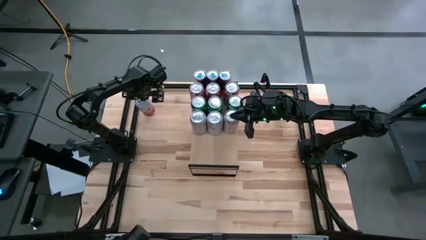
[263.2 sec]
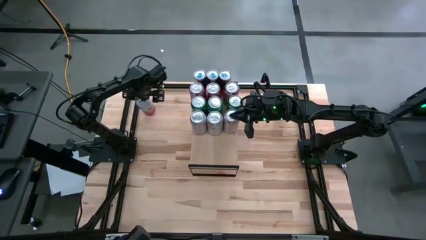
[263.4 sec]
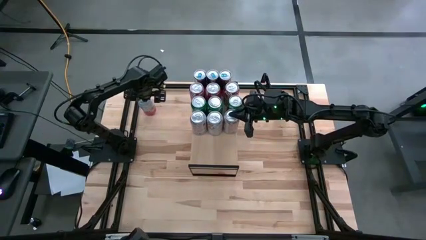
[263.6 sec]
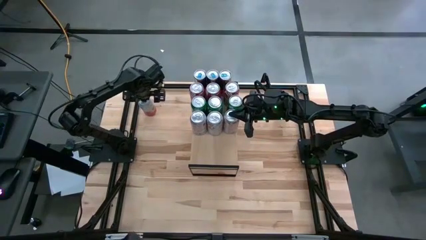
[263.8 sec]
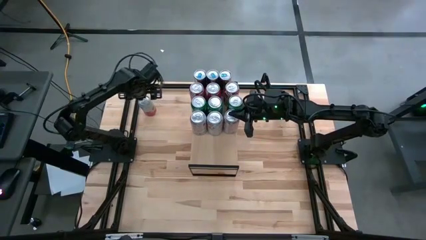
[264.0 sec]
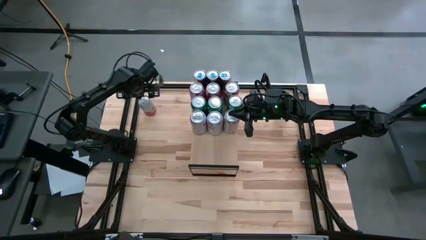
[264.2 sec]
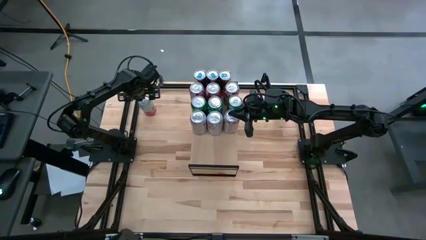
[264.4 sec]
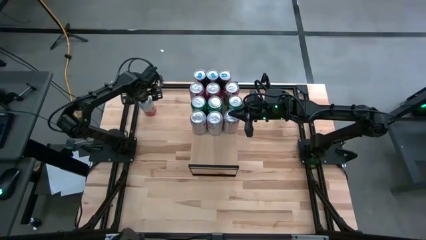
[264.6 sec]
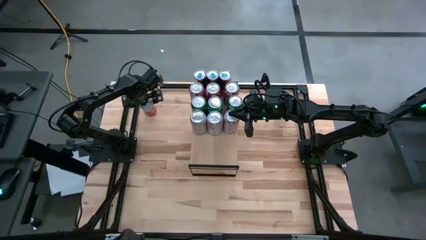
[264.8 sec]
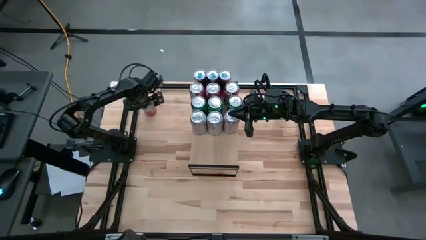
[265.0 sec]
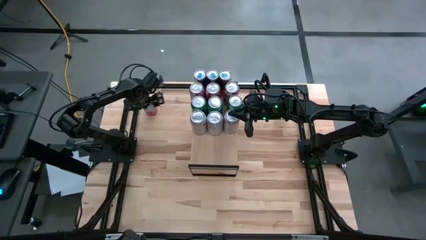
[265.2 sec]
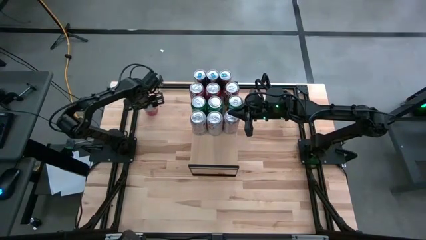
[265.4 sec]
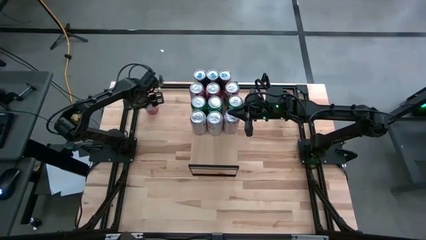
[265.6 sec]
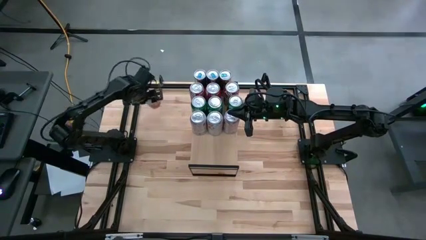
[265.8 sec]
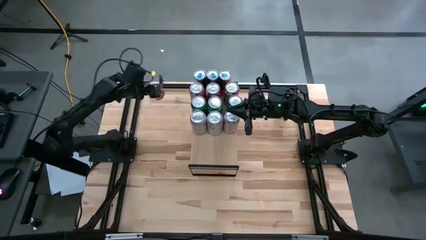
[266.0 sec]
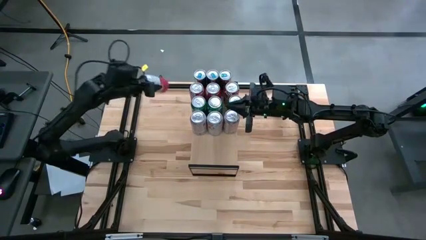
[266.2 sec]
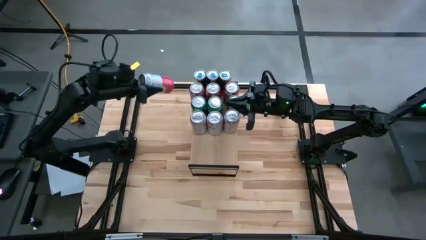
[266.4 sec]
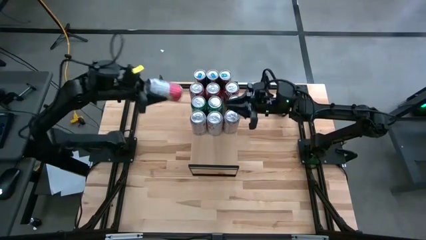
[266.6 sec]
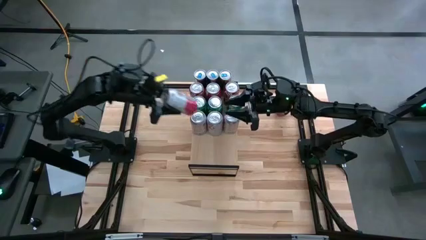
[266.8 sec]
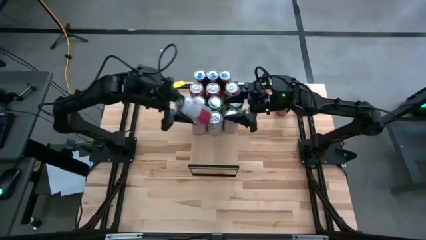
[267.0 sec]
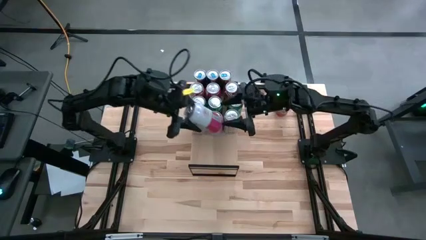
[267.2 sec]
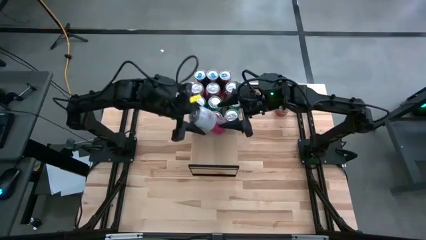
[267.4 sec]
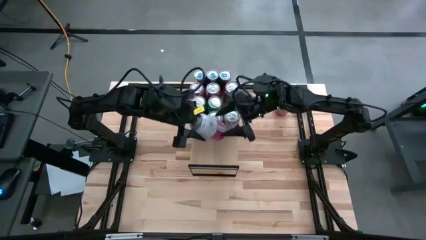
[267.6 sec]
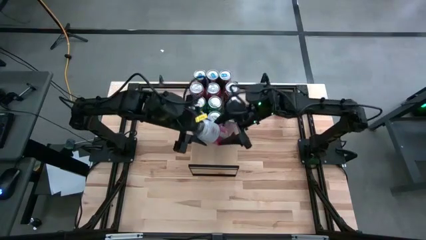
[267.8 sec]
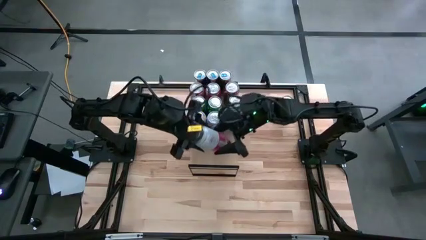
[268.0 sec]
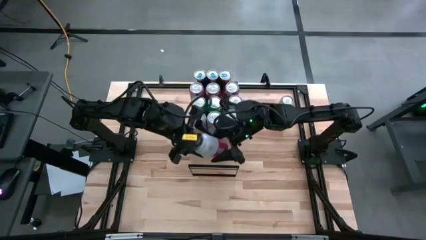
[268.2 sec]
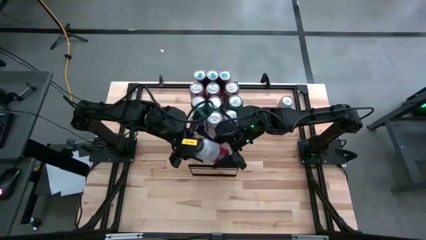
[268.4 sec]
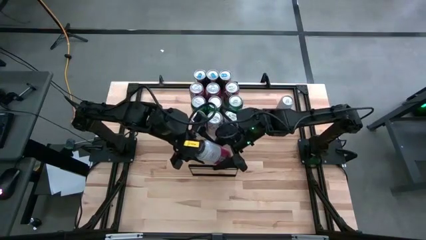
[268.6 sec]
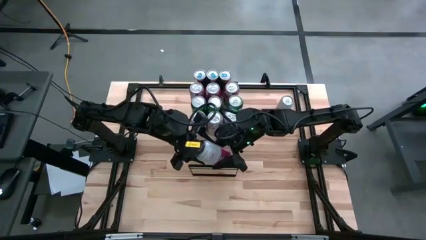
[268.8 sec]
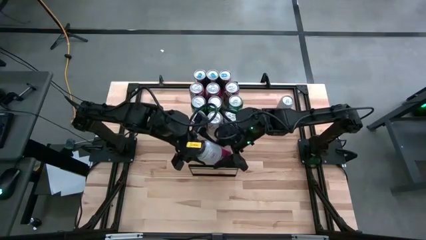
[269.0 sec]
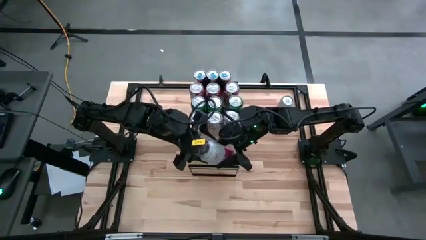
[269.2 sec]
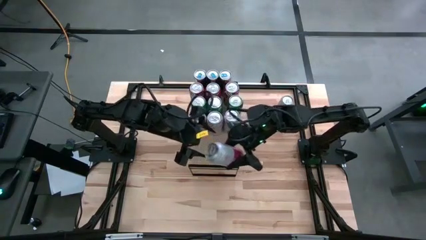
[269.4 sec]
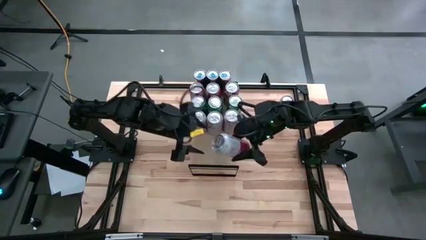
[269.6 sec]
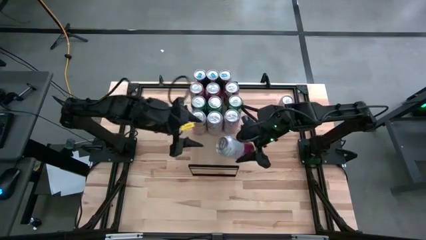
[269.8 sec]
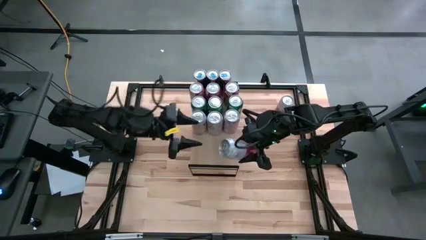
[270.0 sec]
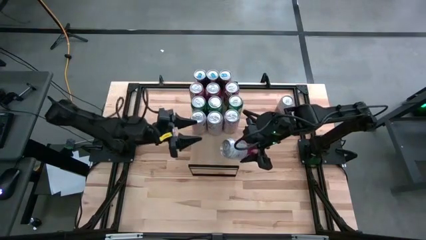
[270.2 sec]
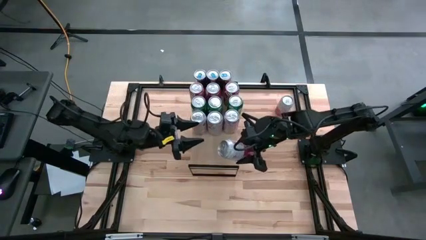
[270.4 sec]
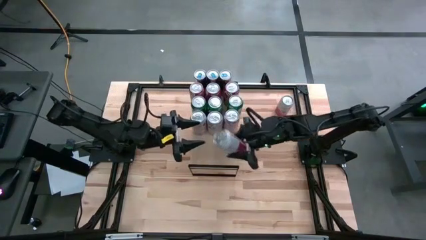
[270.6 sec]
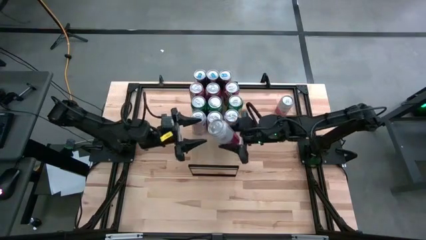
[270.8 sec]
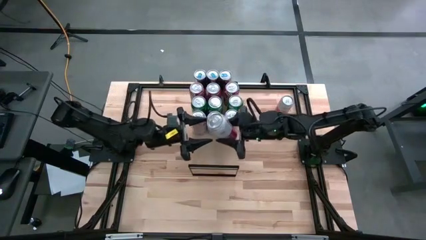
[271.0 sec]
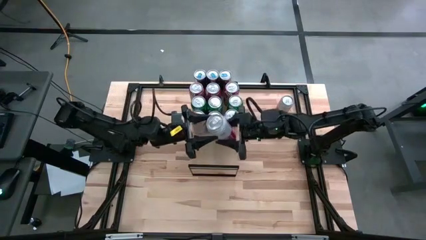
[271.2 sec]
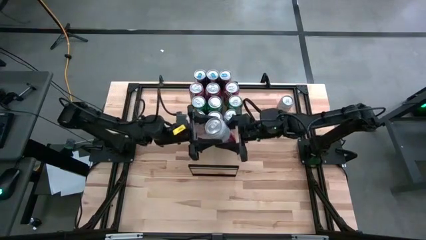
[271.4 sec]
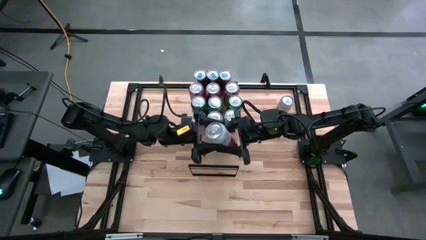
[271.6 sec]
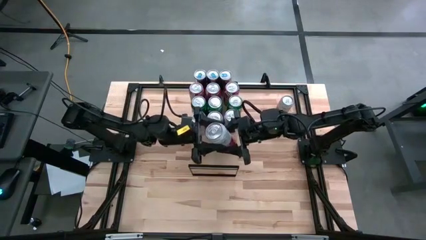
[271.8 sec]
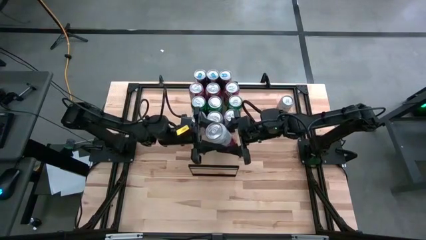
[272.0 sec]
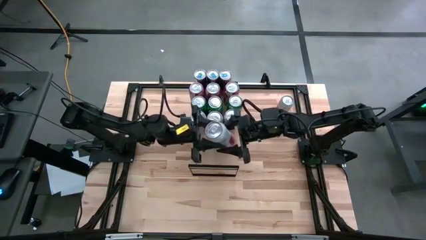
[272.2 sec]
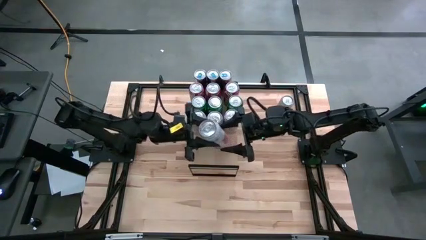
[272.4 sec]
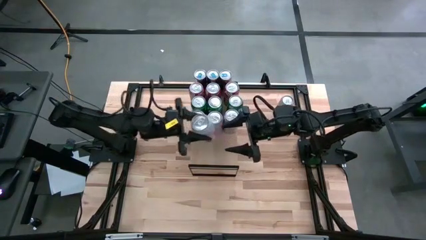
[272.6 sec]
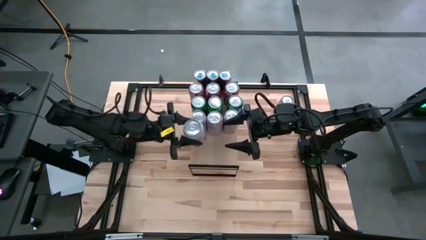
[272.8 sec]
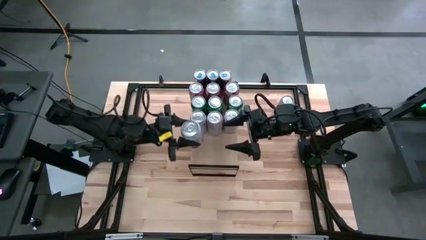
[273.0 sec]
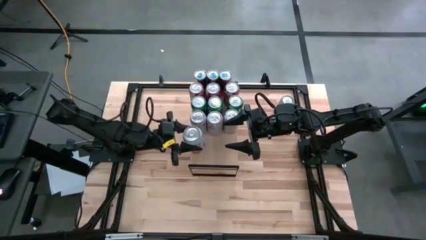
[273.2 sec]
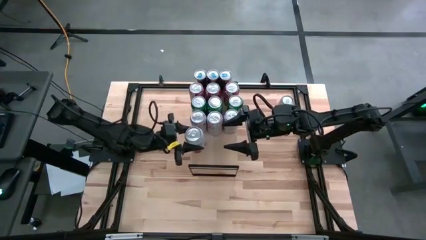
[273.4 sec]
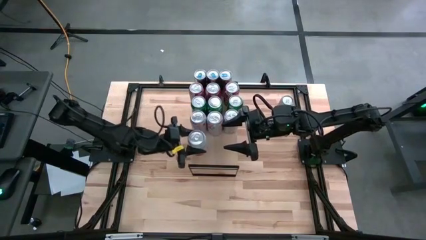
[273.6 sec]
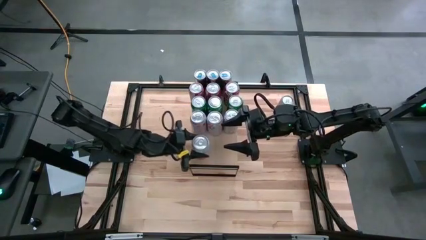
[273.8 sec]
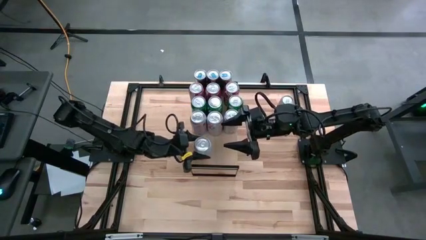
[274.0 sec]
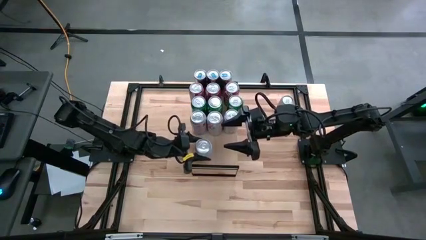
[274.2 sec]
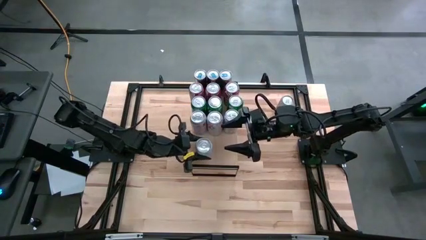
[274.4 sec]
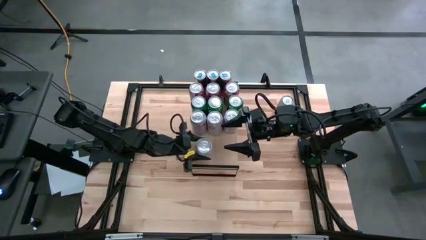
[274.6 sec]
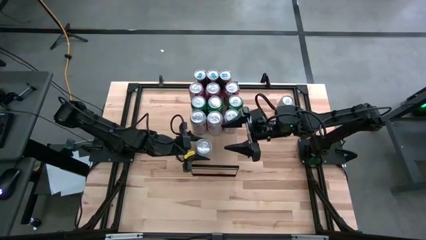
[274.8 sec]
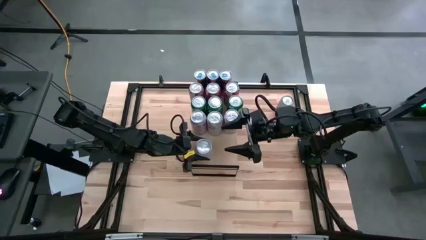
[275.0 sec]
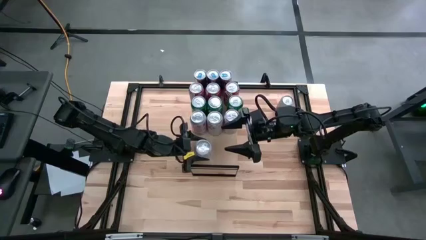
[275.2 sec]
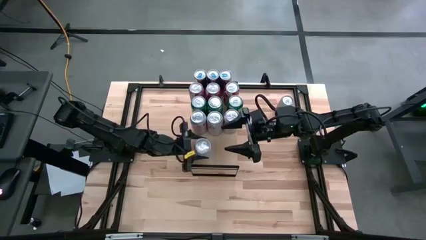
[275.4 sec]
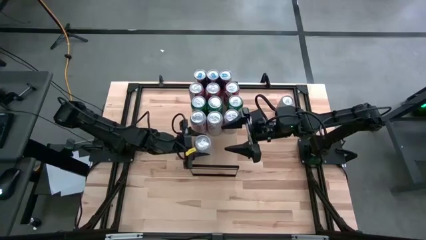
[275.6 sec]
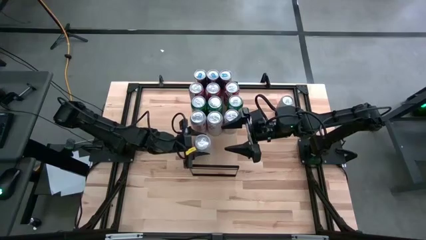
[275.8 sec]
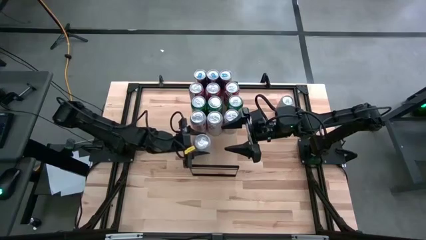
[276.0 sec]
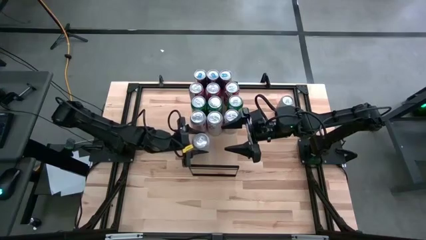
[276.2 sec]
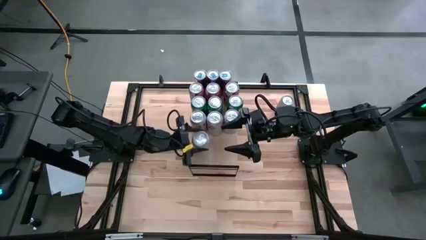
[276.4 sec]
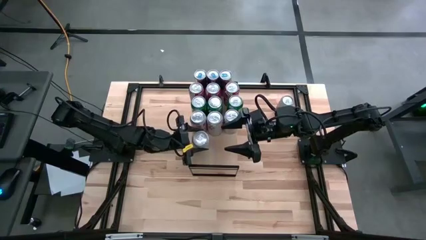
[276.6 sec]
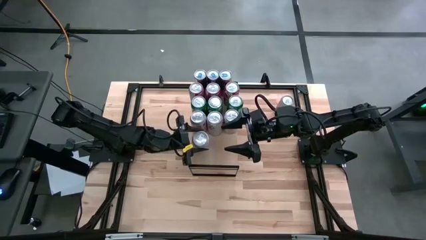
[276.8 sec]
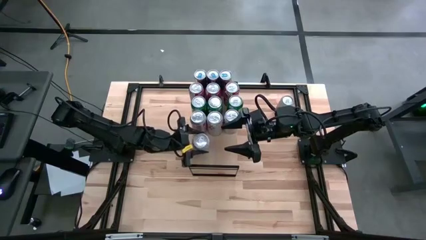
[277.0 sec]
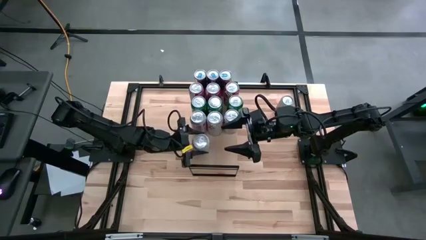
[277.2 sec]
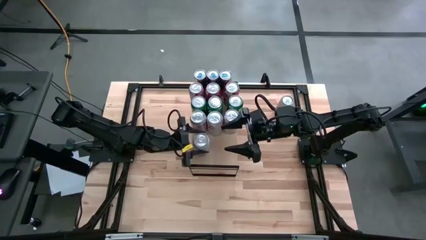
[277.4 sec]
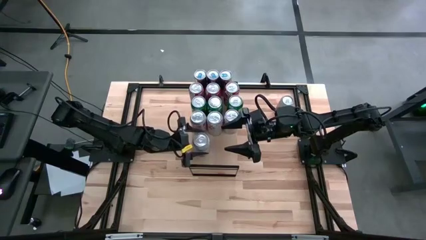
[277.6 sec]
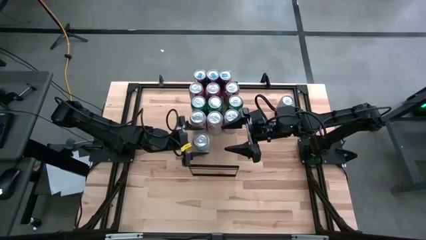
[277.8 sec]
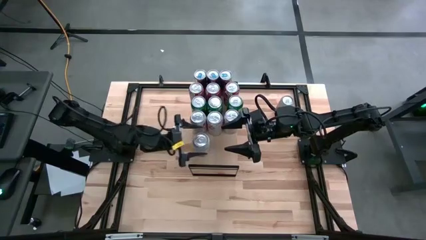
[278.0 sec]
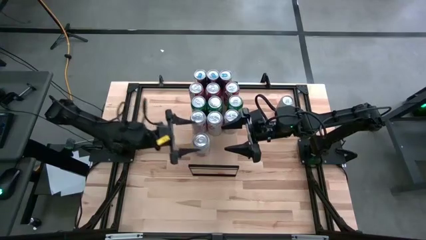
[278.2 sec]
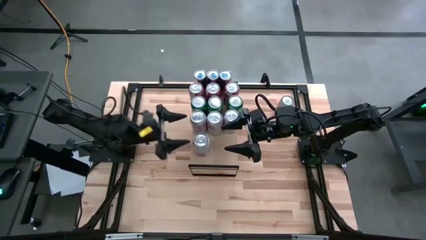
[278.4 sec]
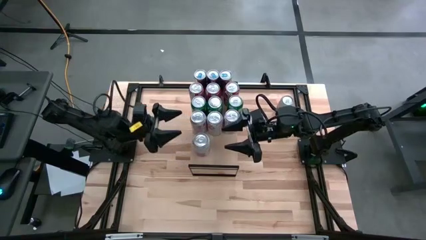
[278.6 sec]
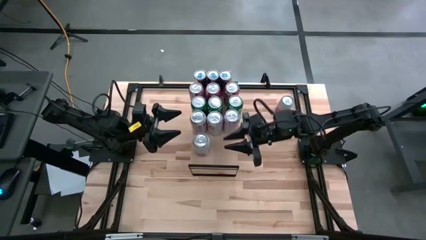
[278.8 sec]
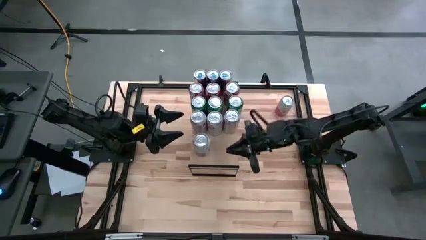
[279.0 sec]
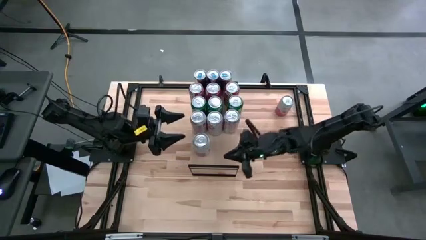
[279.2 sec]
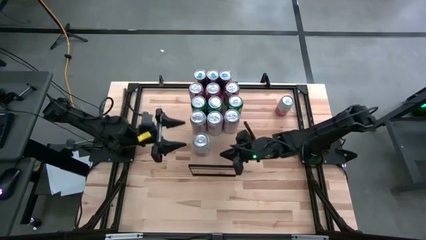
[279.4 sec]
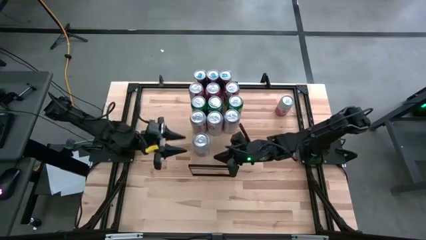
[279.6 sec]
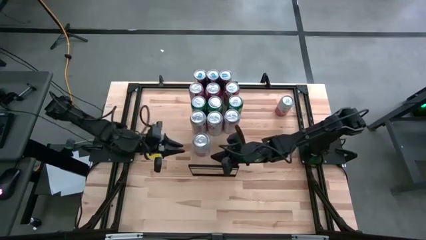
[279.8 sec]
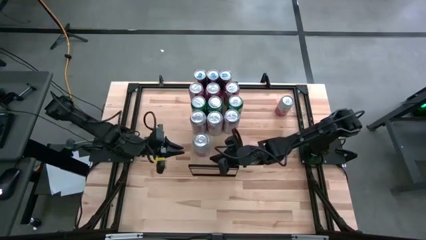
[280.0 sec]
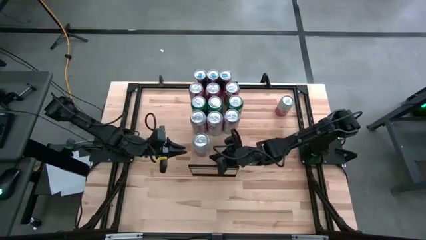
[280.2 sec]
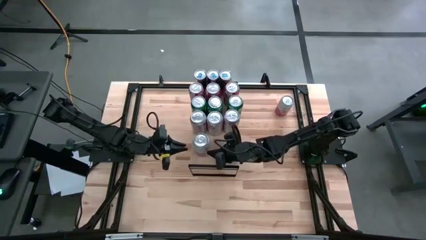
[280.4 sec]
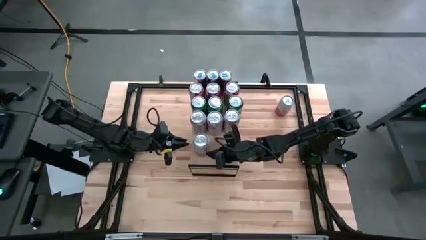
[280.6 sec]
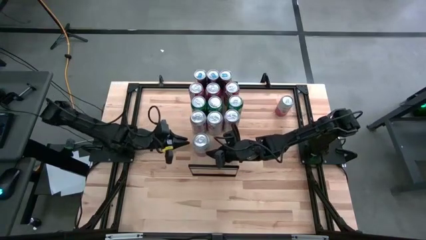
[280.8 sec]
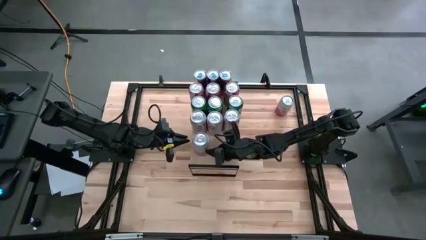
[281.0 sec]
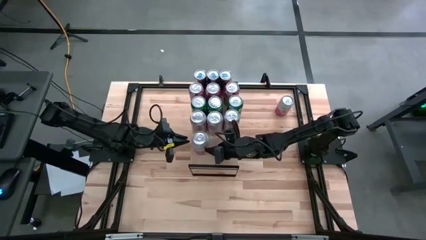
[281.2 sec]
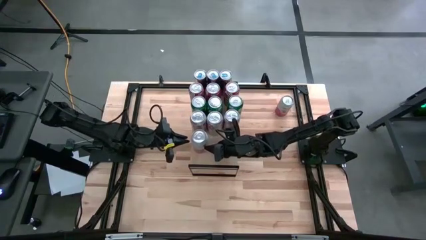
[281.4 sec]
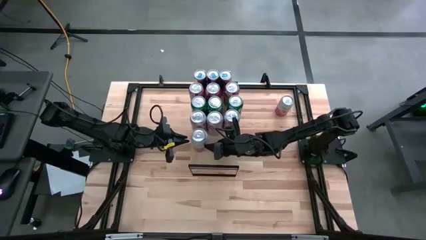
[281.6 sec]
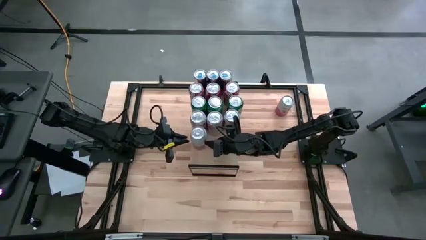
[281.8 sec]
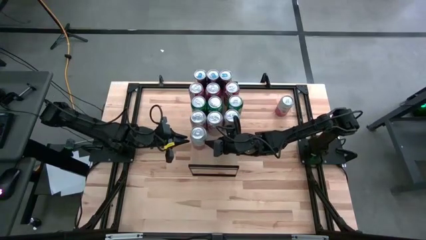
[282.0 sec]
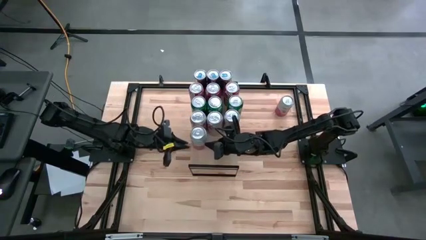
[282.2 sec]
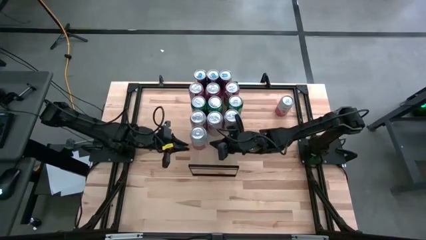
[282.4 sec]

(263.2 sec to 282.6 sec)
Task: Place canned beverage on shelf
Put the left pink white soda can on the shelf
